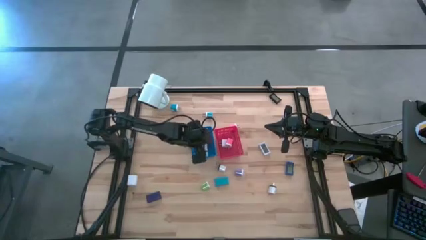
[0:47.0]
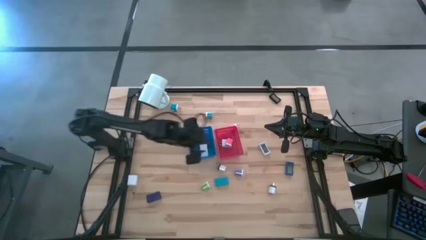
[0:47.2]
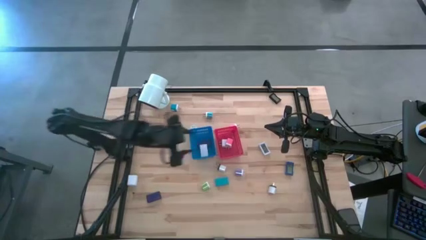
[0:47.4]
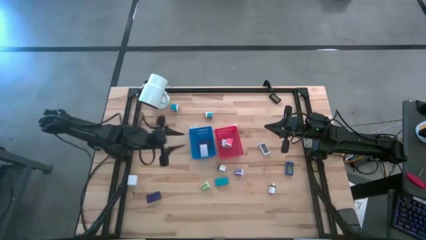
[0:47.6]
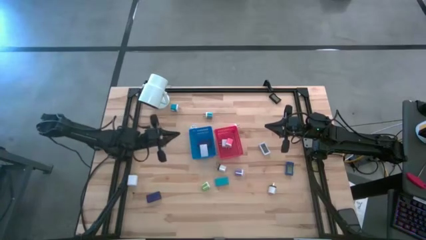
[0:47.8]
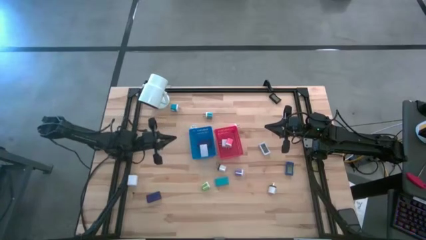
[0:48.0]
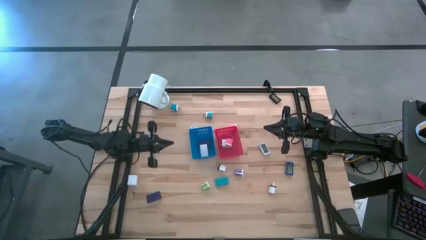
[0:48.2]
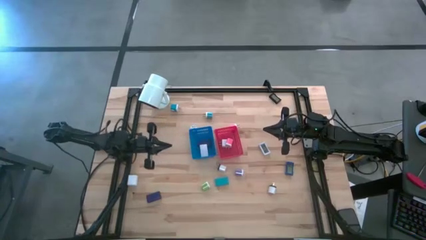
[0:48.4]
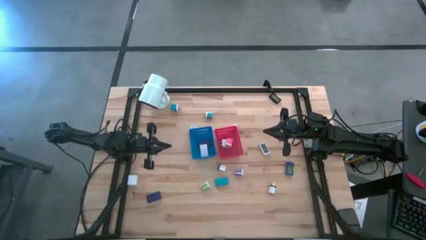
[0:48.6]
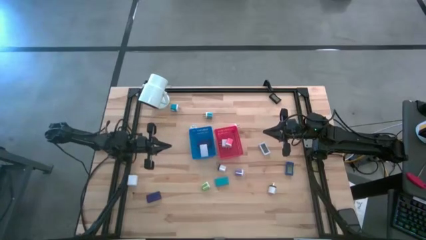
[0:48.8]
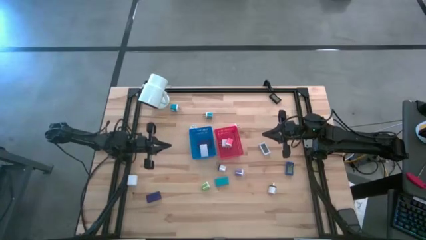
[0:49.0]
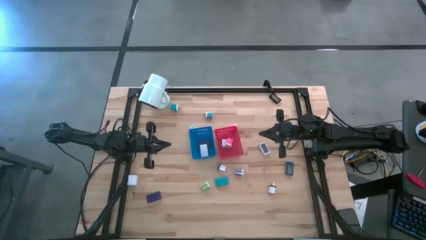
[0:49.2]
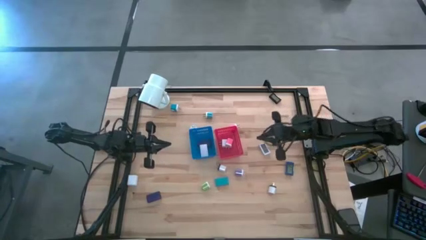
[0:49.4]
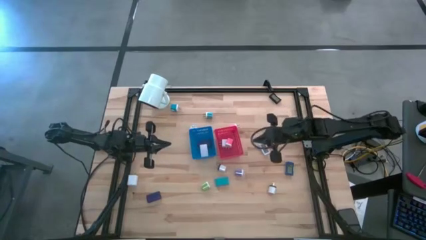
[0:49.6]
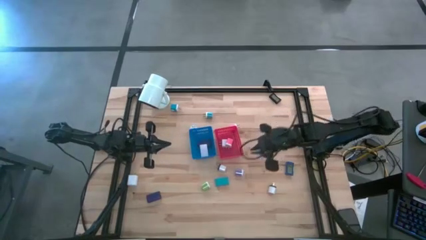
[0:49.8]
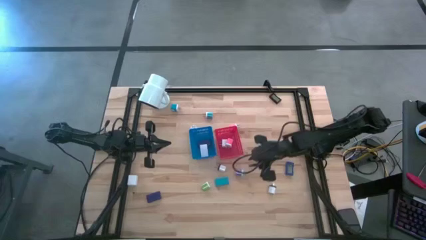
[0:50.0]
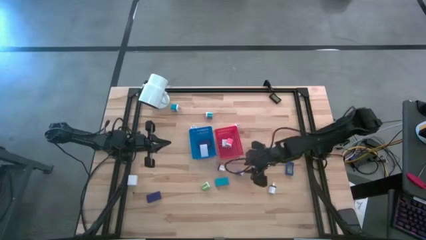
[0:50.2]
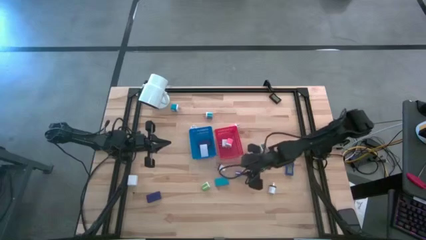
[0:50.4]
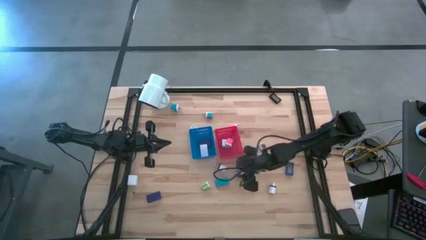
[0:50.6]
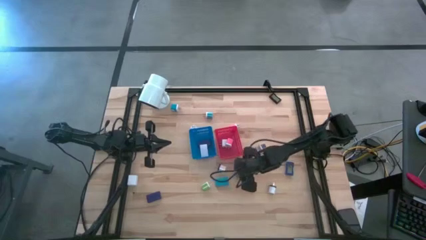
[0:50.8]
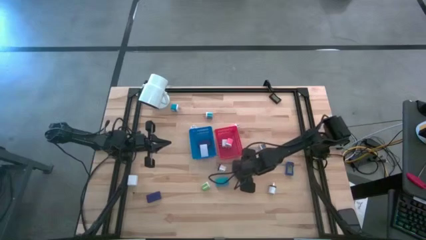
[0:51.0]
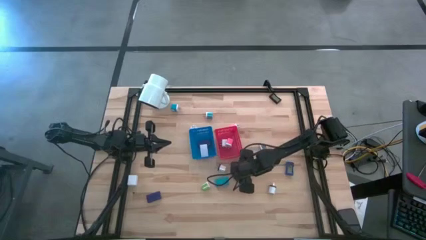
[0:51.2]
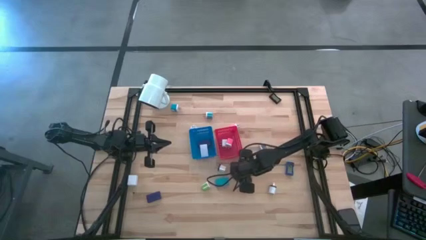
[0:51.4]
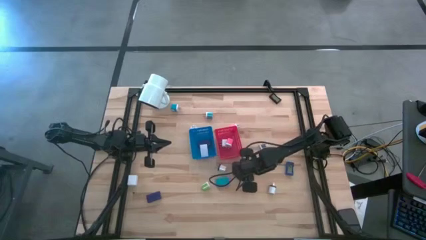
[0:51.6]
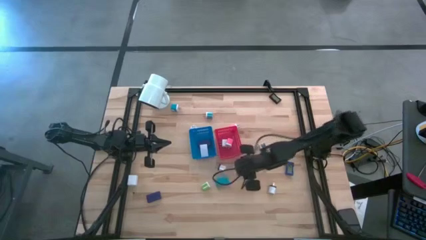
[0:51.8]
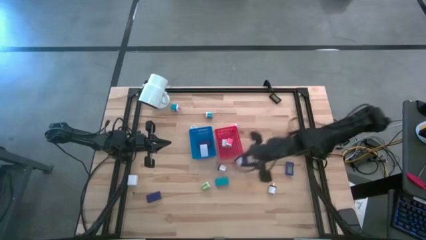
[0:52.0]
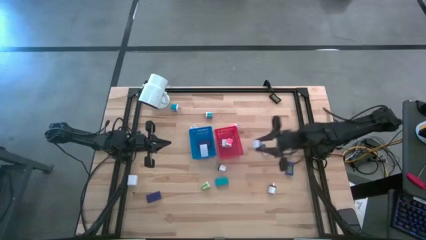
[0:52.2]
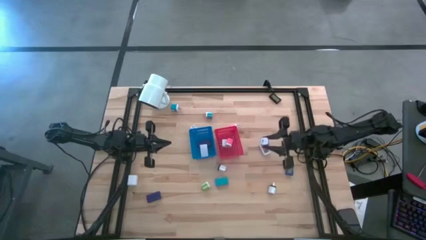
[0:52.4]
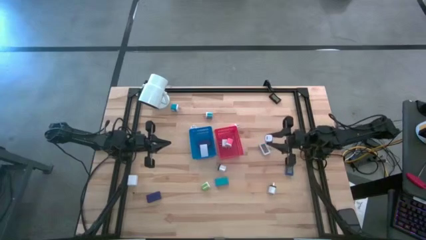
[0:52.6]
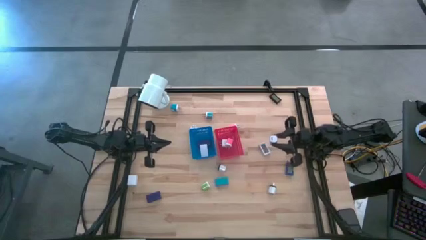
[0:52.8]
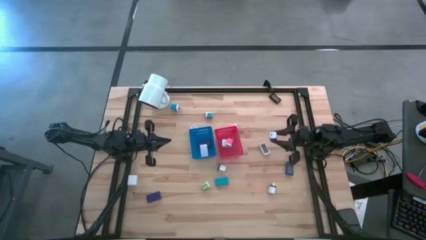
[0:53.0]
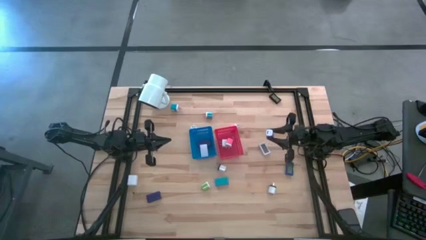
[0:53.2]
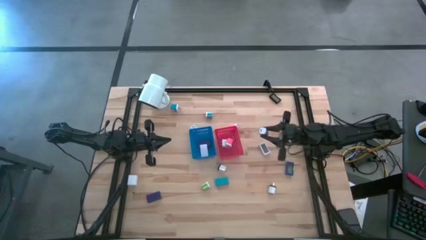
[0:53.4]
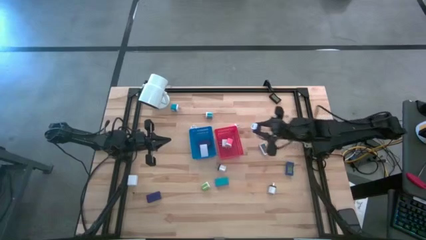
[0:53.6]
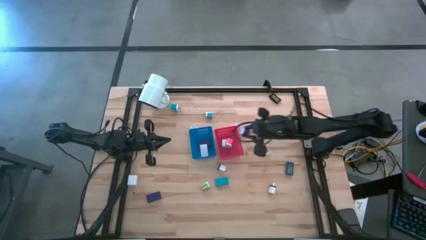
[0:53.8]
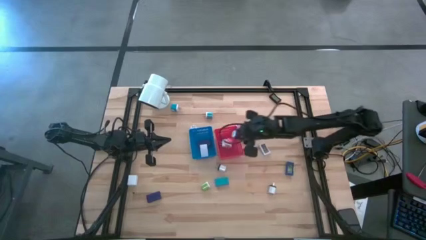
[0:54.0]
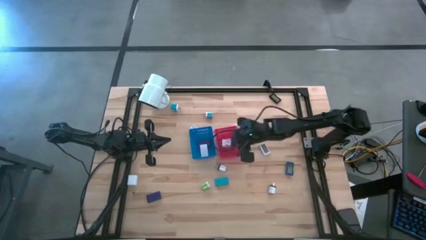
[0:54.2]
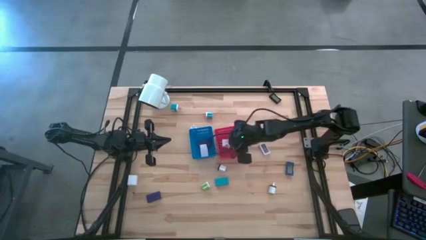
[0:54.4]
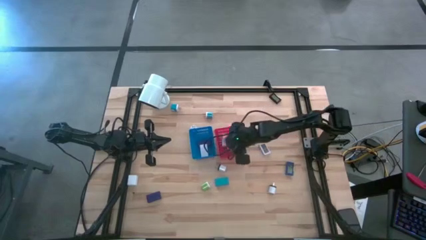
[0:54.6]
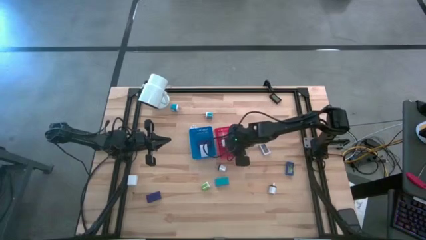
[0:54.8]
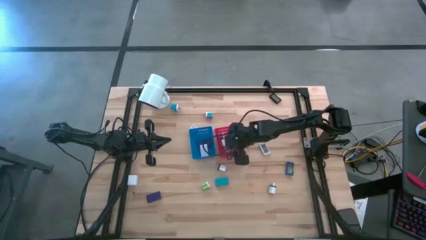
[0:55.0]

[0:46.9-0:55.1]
Task: Pick & Place Office items
Put the purple charger adapter into the red bin

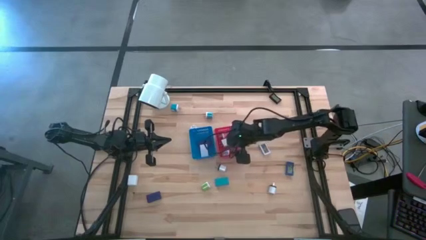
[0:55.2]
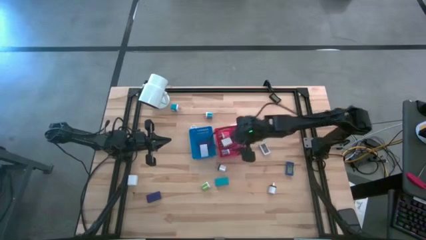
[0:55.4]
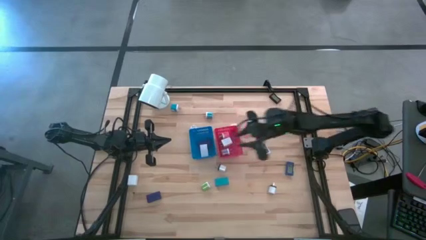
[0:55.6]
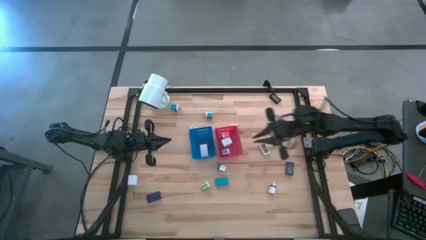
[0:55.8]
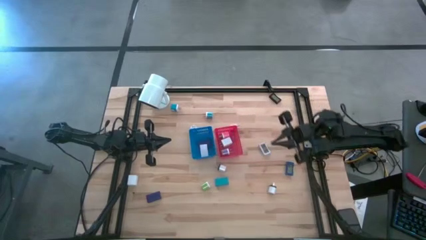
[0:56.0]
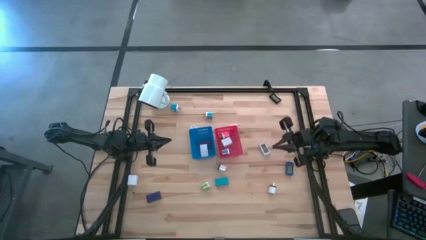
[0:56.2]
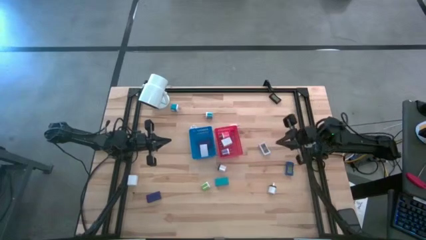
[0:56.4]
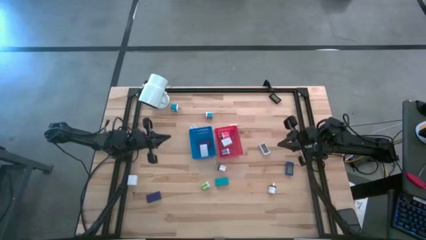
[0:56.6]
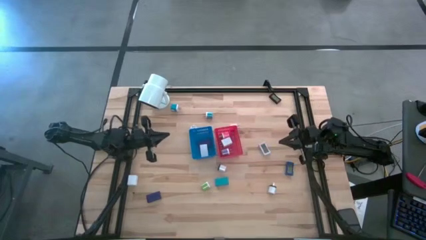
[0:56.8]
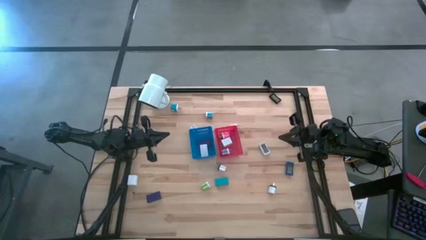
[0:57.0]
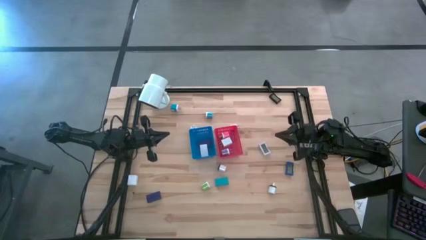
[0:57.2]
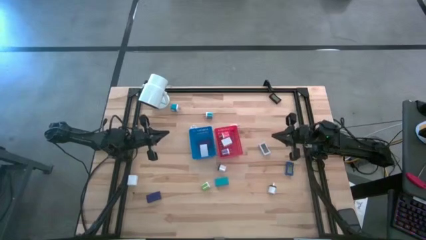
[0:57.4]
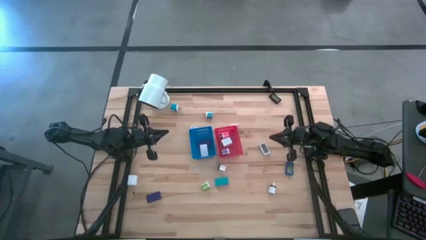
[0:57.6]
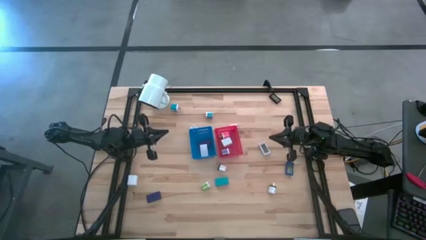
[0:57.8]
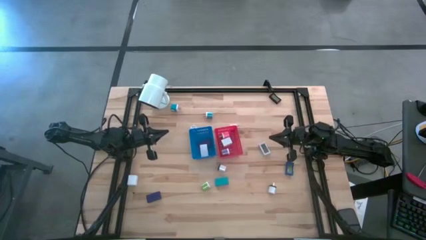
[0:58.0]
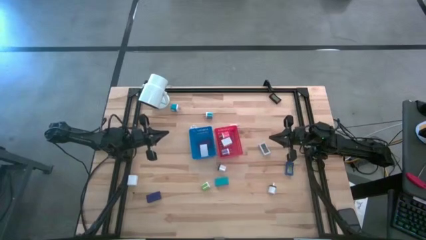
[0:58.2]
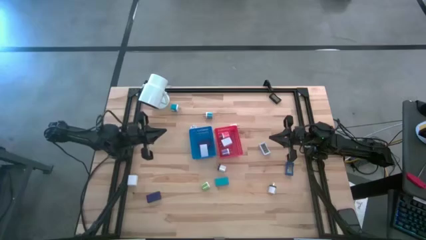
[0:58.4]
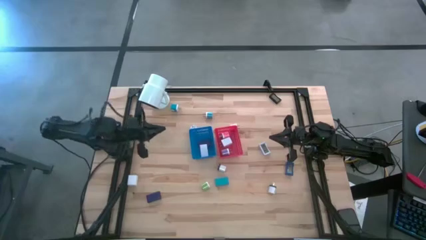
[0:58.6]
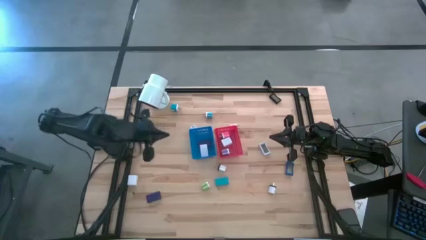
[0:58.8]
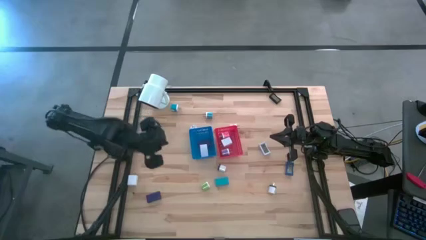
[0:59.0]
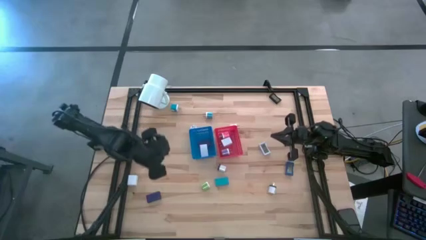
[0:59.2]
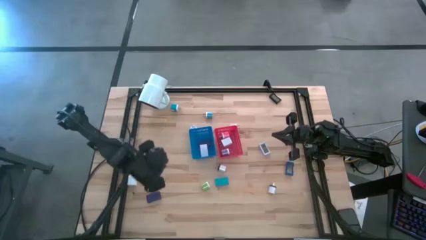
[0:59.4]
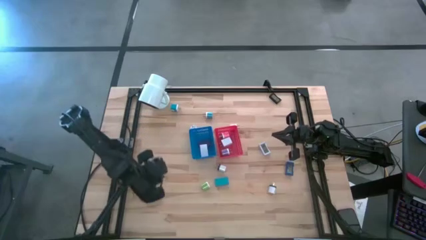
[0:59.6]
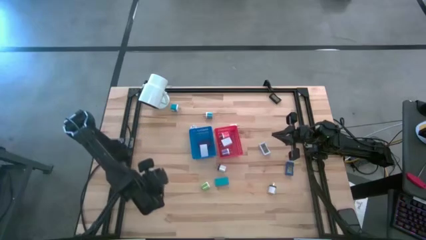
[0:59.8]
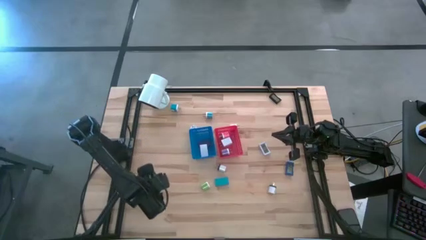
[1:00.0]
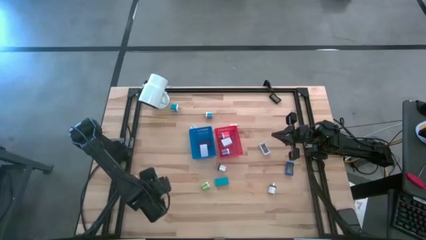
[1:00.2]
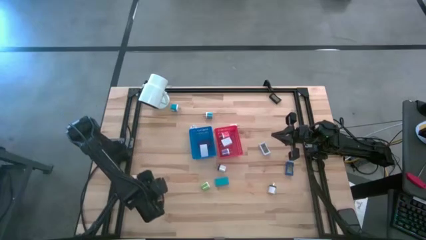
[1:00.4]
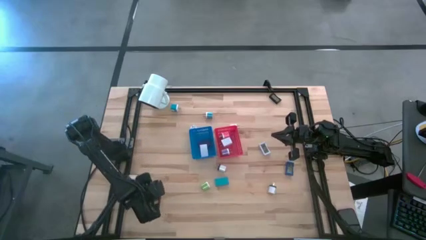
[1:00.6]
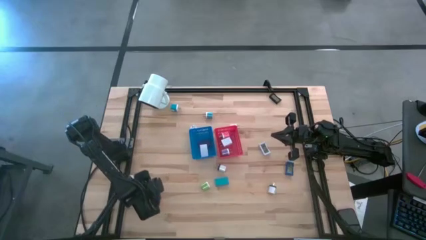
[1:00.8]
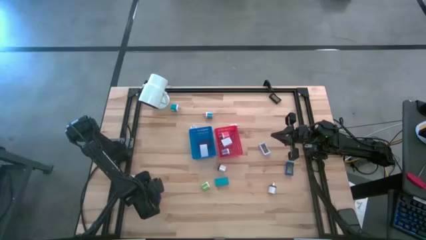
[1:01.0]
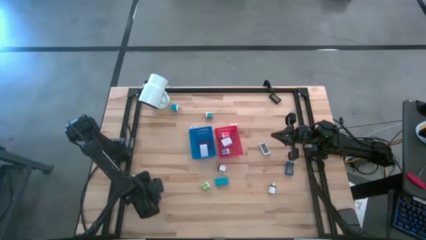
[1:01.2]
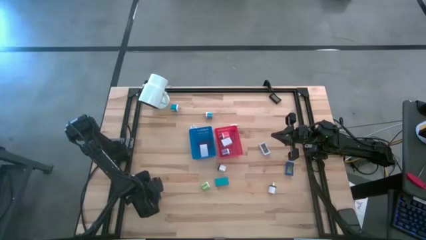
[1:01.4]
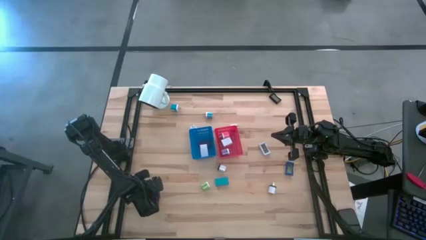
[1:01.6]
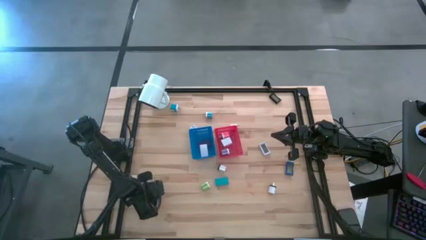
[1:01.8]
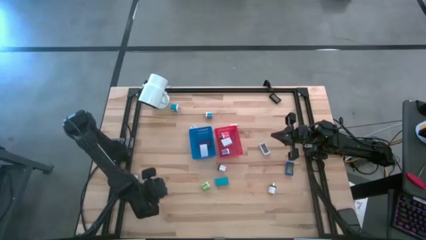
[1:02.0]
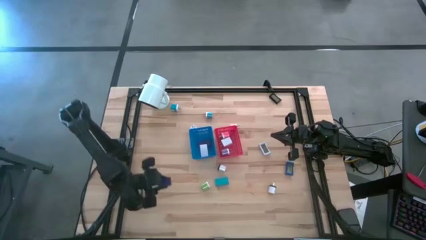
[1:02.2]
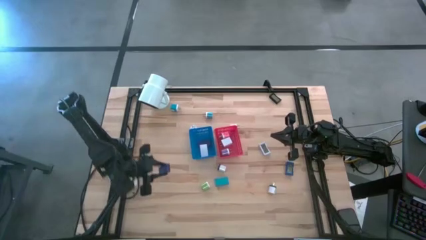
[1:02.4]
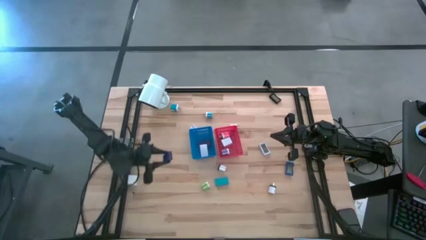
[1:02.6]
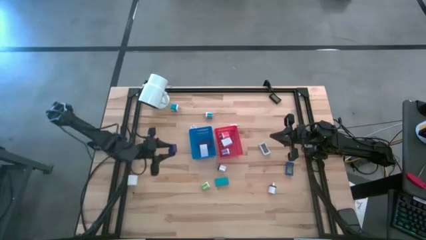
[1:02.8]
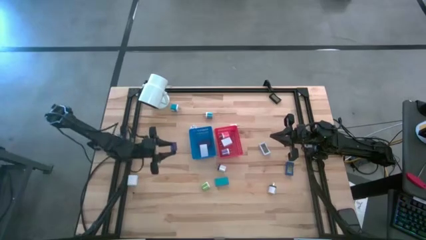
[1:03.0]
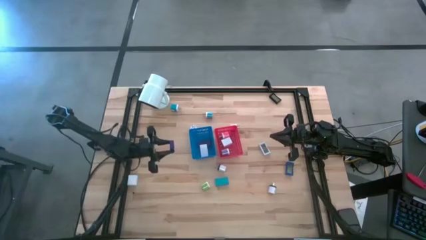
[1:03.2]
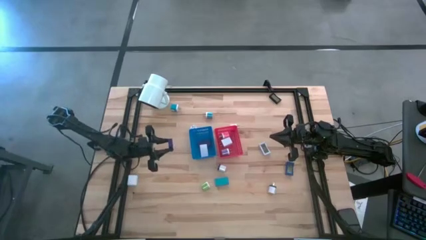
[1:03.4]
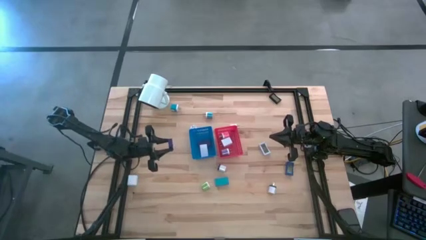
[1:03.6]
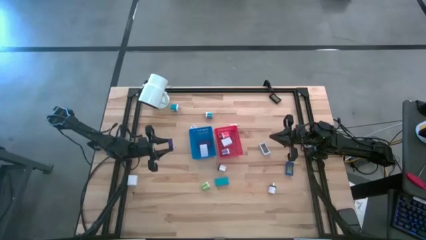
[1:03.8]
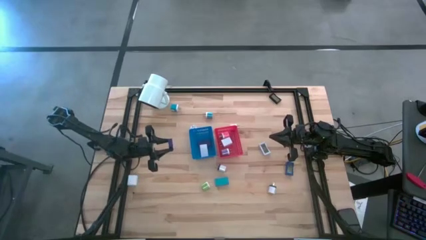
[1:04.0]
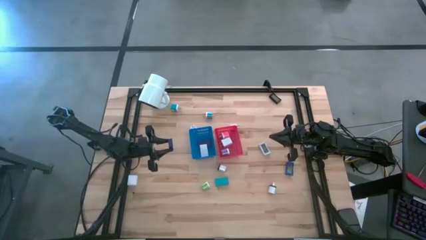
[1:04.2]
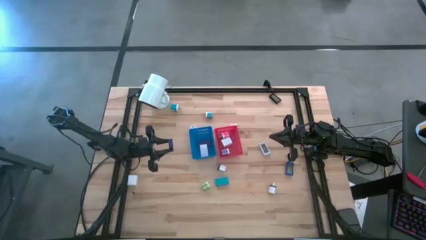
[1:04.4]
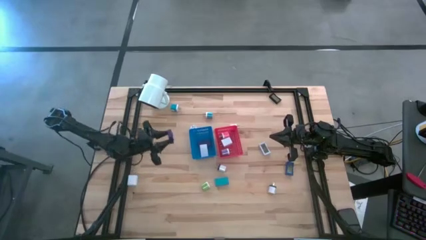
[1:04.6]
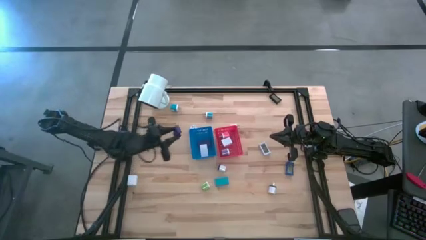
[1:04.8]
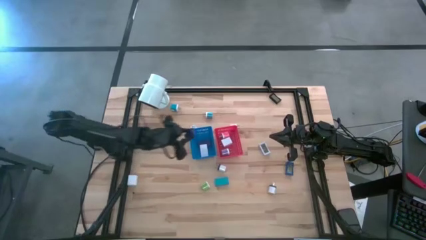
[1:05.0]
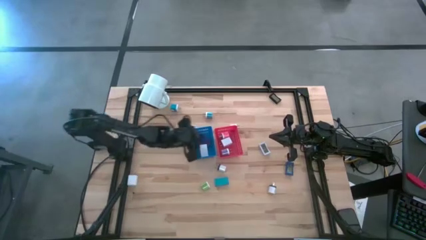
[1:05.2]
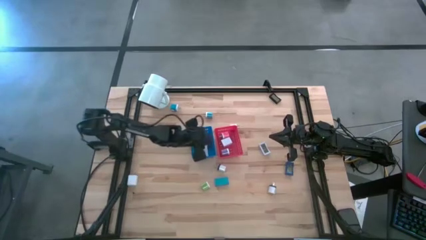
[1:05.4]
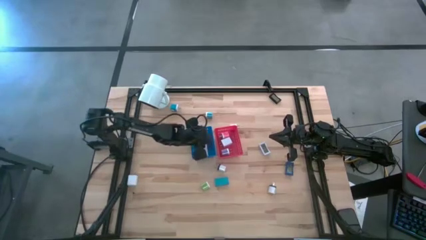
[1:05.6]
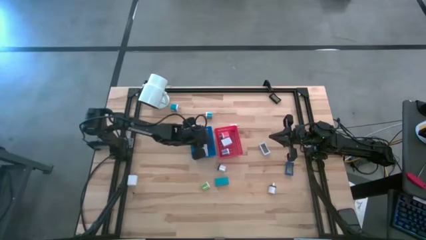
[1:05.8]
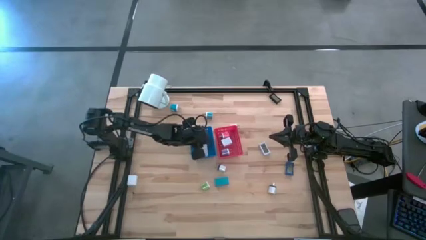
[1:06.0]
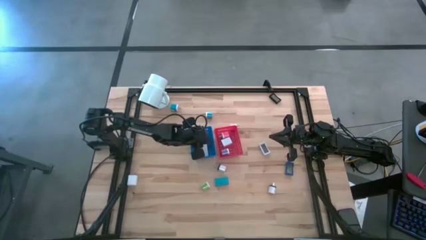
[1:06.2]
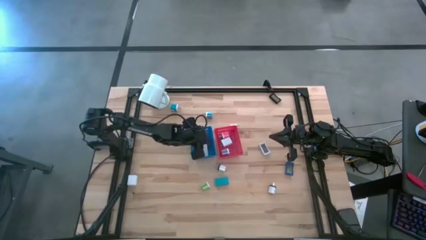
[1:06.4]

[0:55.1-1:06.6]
Put the purple digital clock into the blue bin
